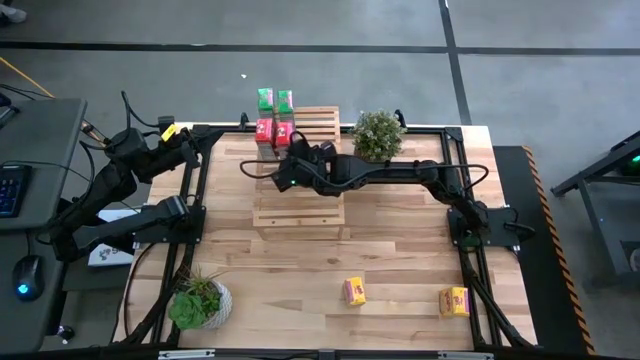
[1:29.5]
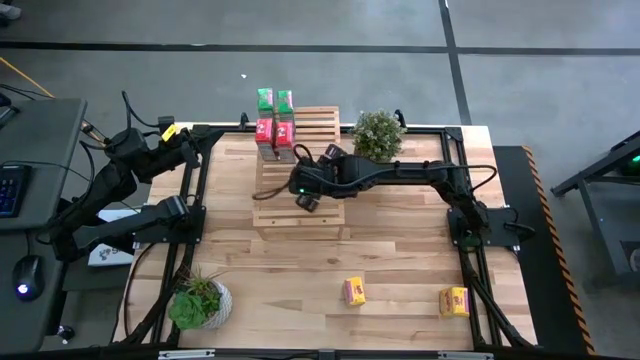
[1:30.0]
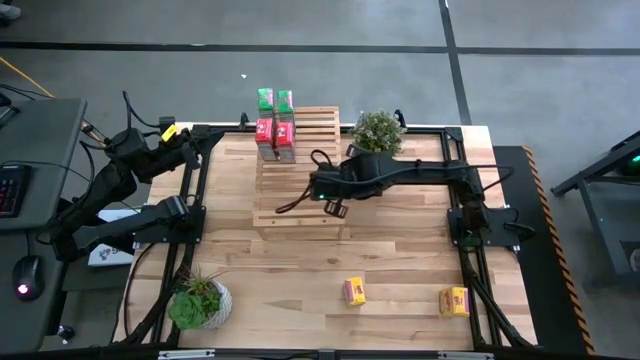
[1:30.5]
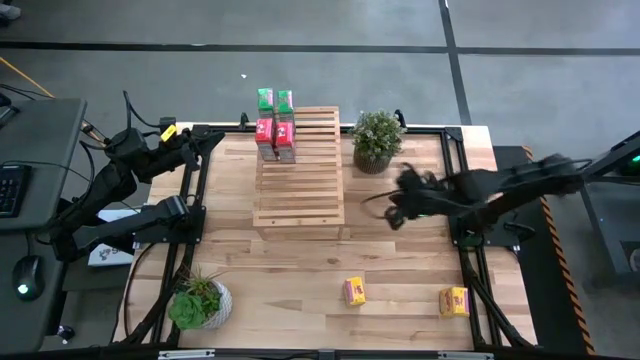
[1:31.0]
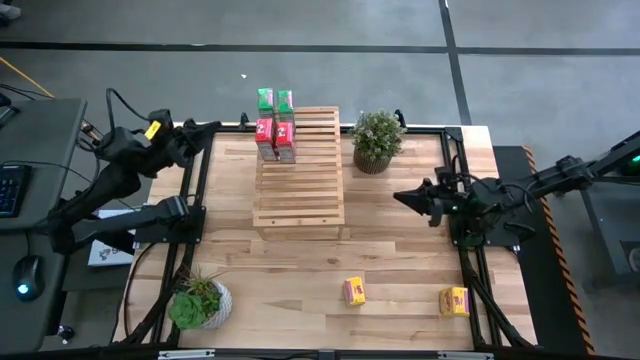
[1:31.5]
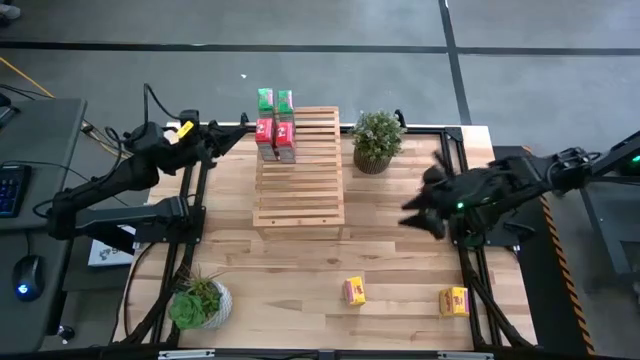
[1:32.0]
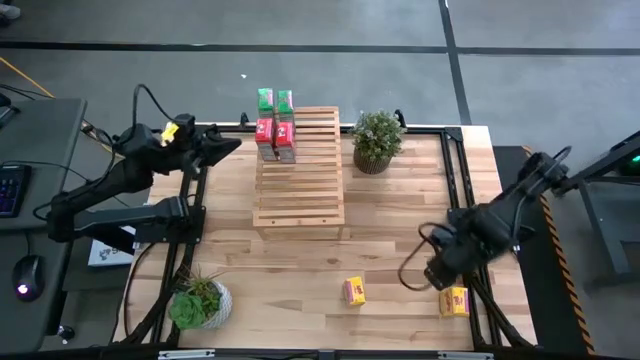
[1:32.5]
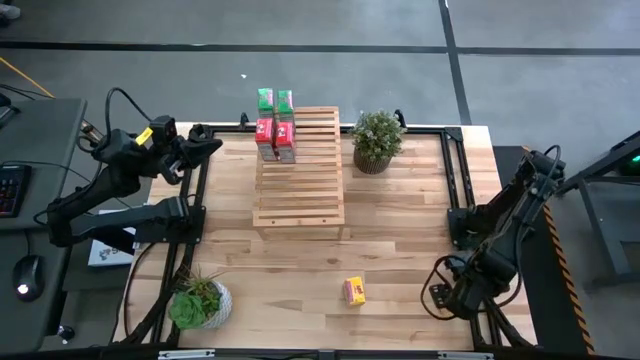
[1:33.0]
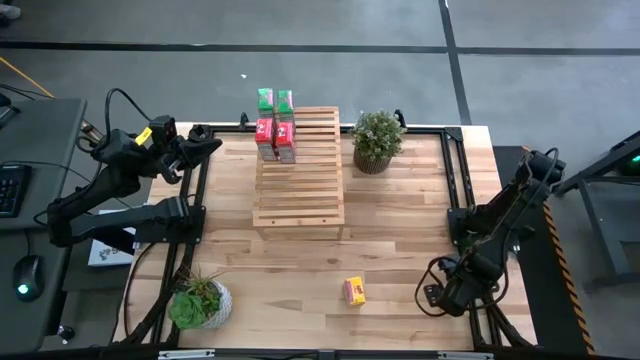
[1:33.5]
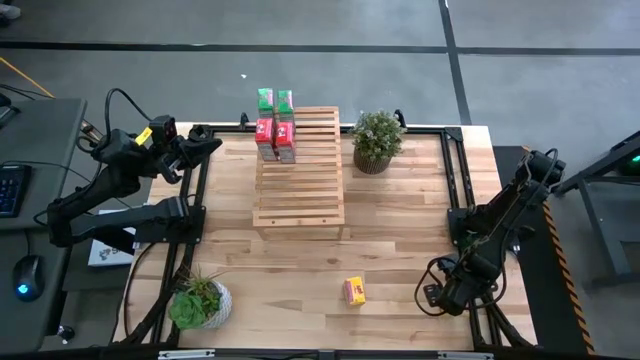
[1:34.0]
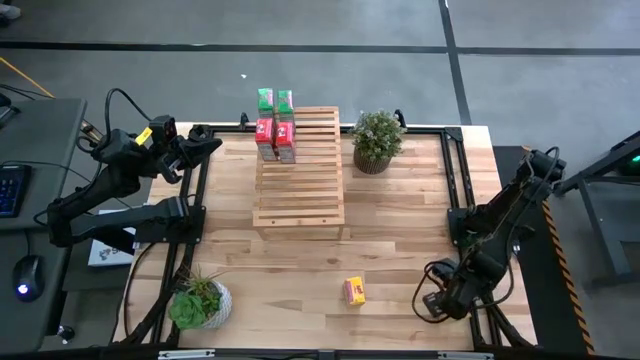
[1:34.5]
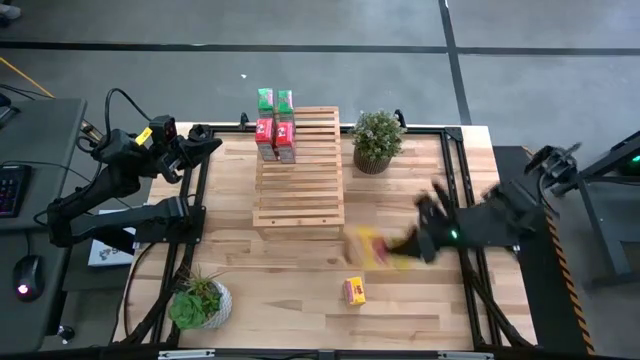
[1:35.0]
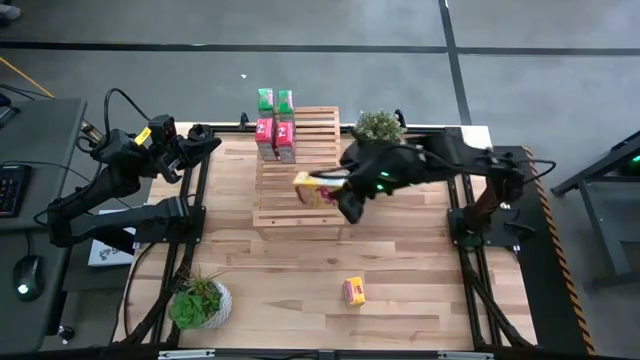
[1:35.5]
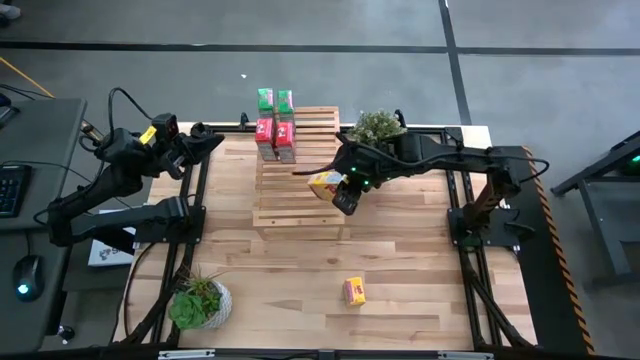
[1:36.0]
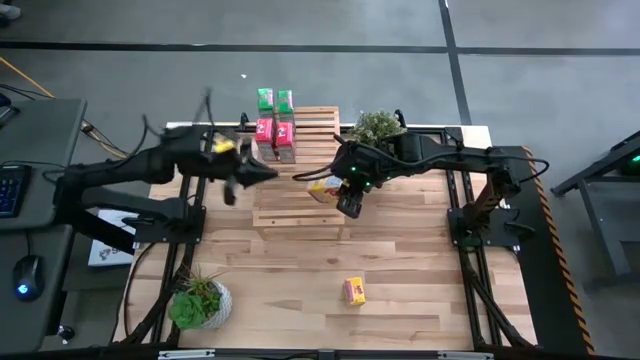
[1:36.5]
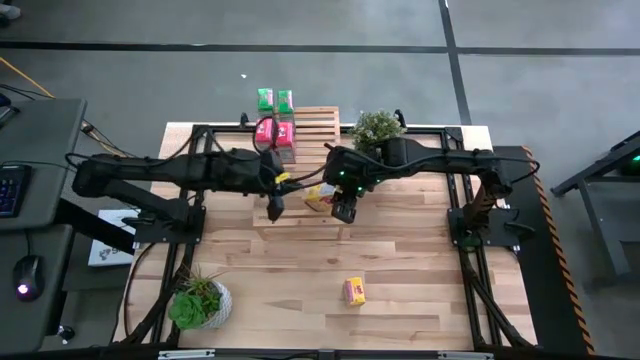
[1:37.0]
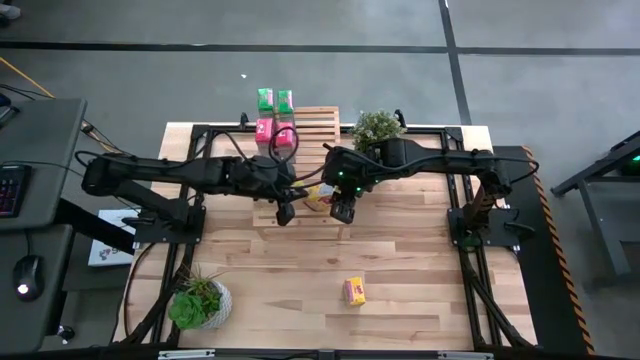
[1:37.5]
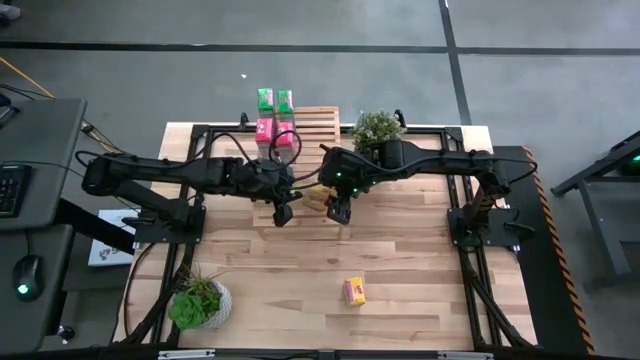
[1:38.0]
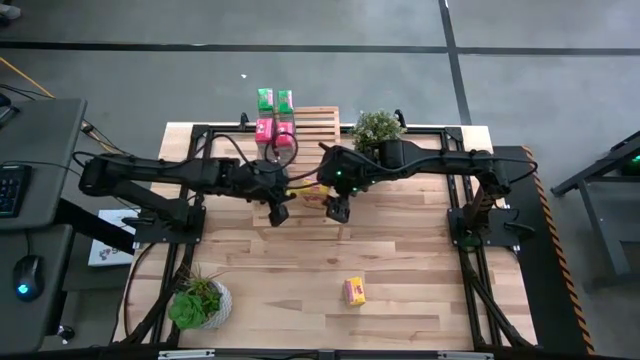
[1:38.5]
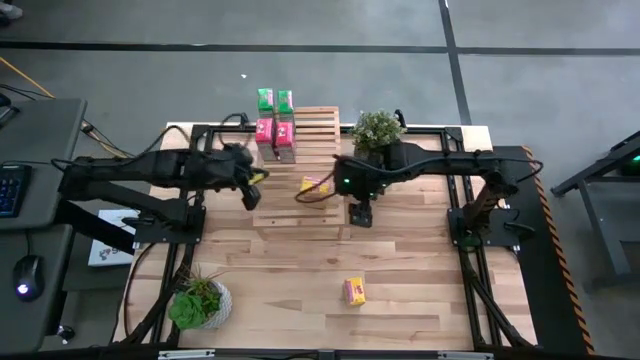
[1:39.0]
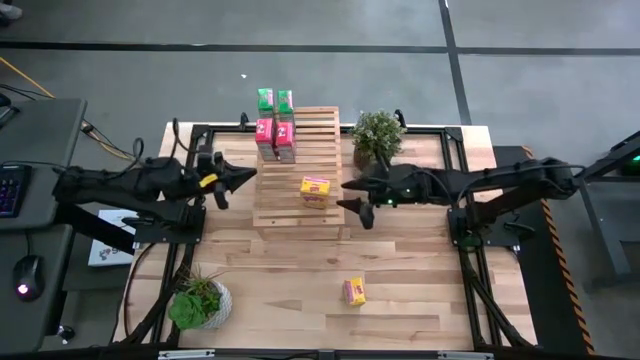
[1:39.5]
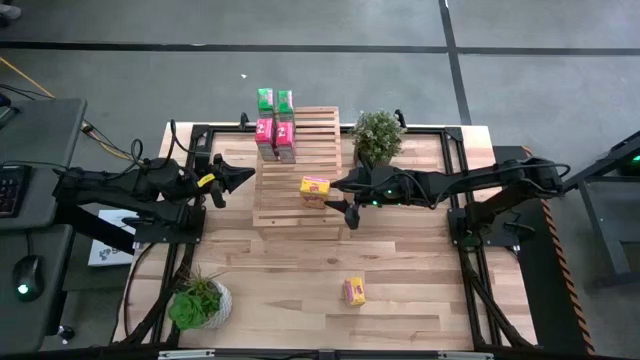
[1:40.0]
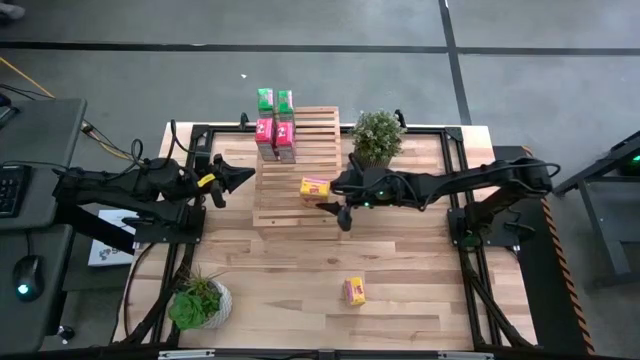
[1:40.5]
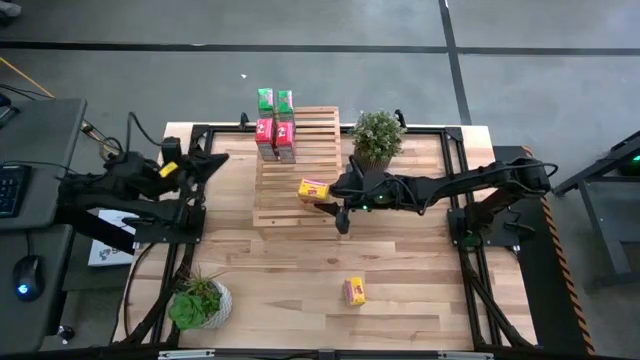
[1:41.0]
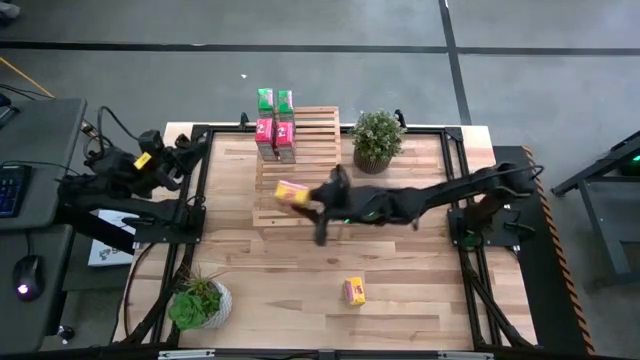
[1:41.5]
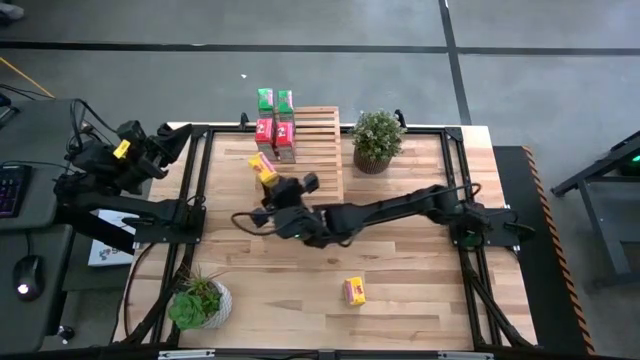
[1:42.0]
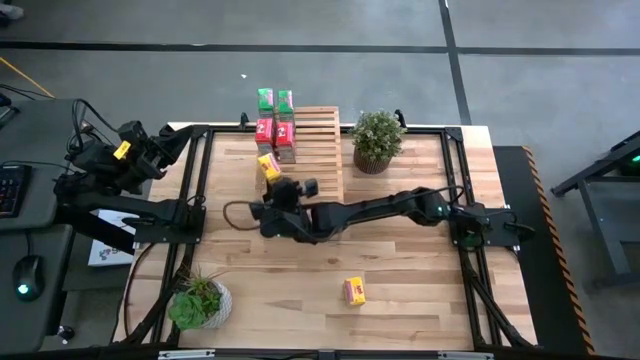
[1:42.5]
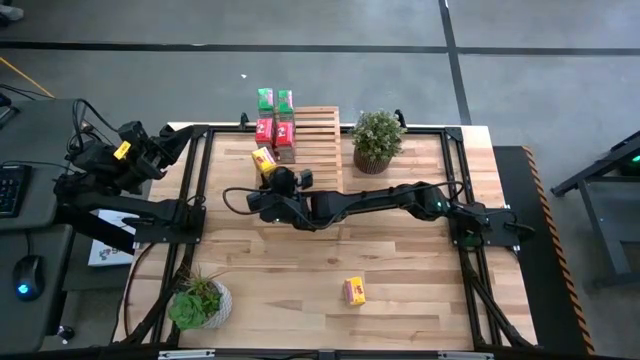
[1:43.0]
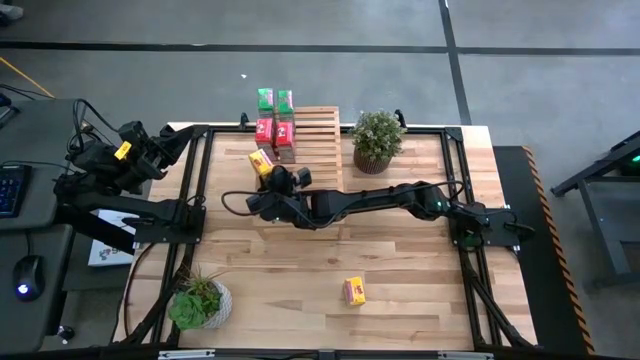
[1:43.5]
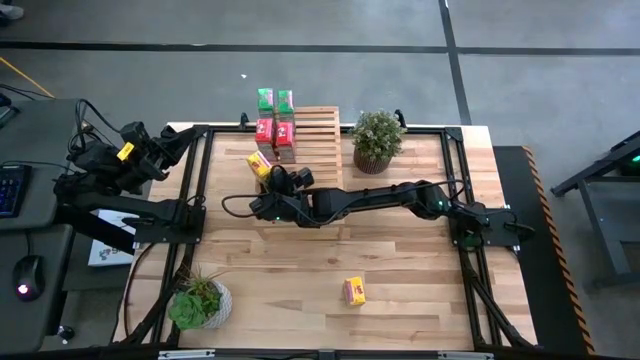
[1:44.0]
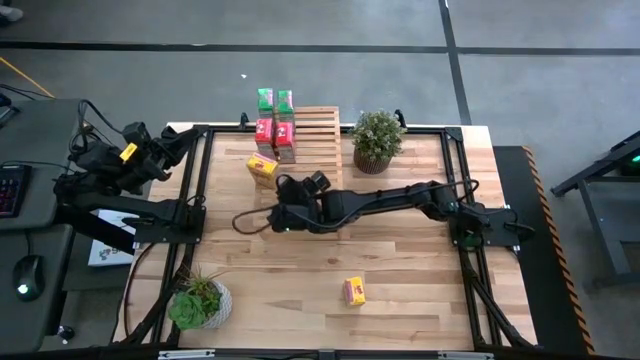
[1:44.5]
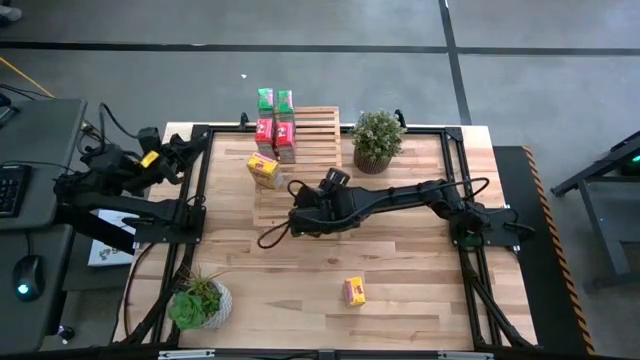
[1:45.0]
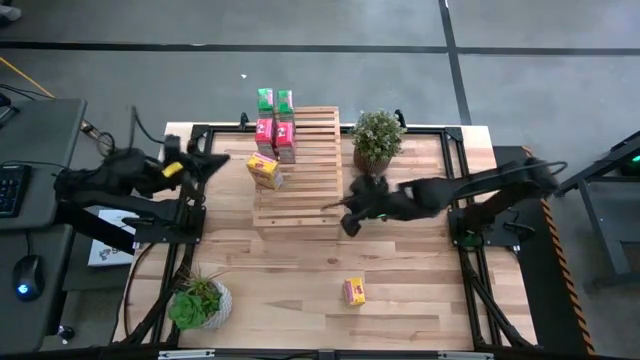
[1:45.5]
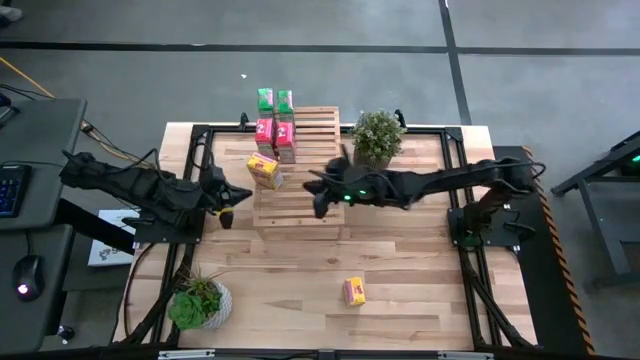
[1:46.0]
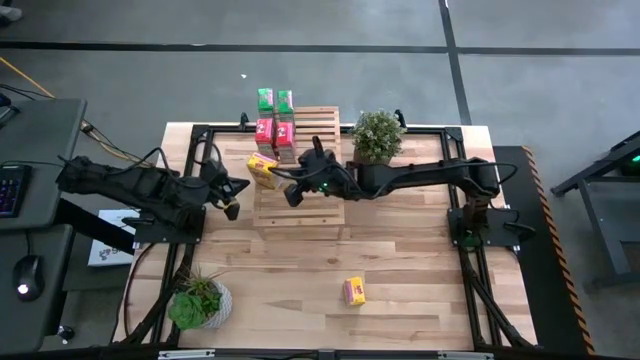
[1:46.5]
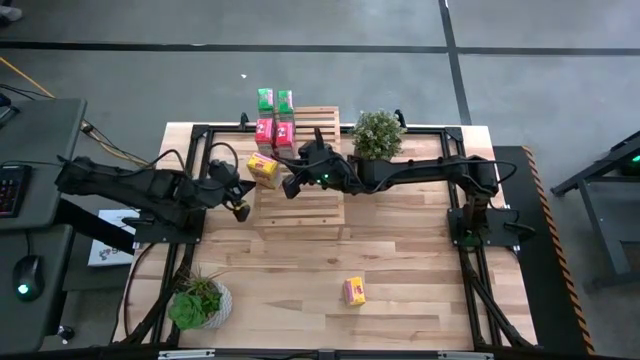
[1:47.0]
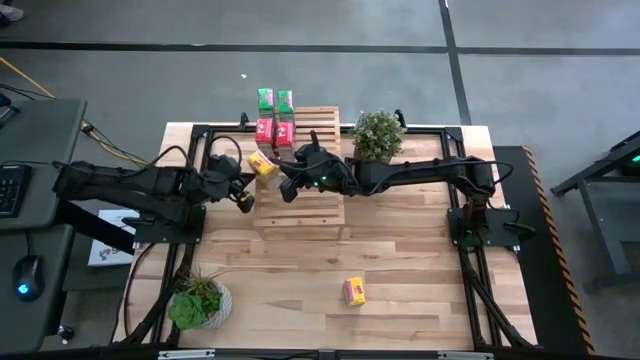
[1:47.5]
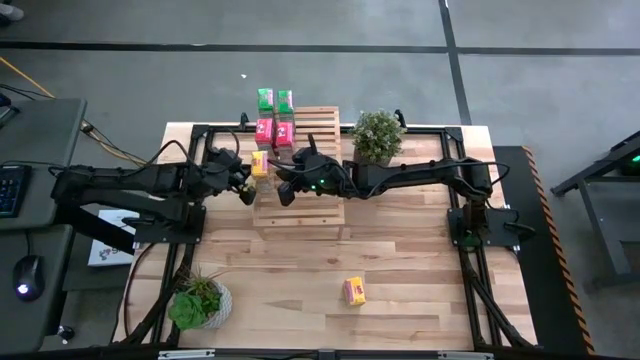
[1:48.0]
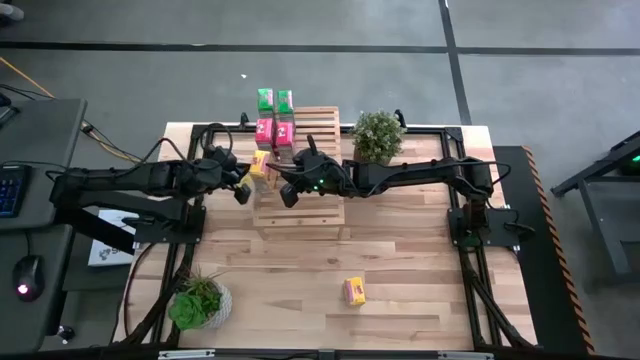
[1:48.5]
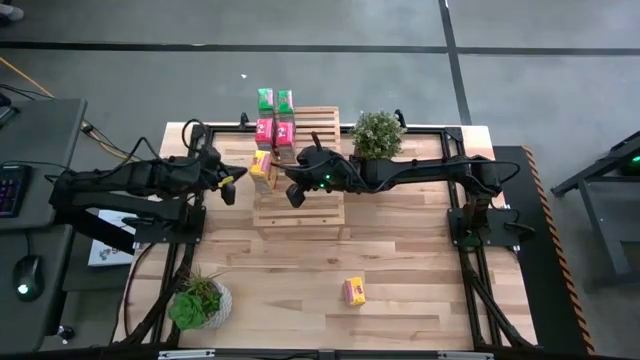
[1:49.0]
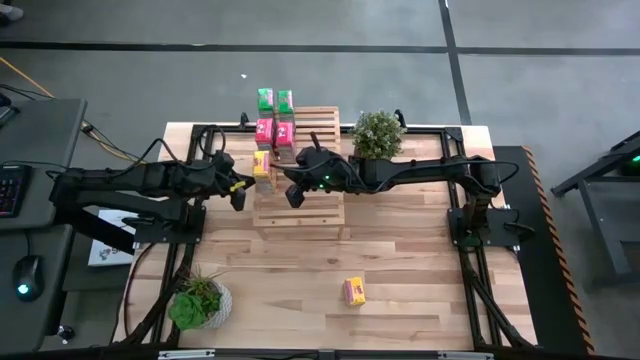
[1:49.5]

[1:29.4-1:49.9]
Task: Stack cereal on shelf
Put the right yellow cereal box on the shelf

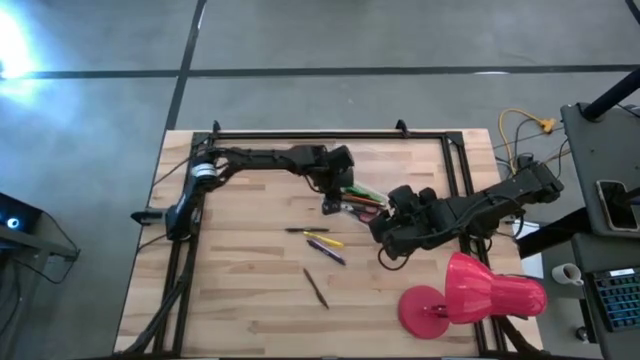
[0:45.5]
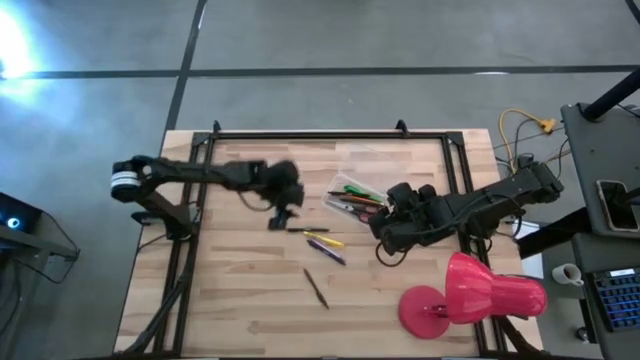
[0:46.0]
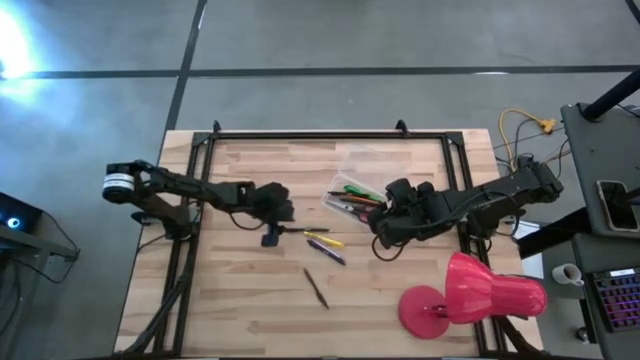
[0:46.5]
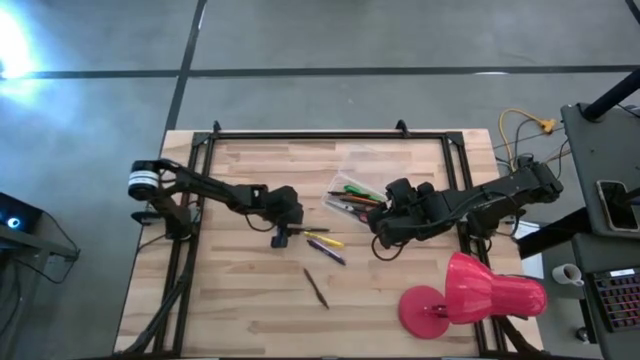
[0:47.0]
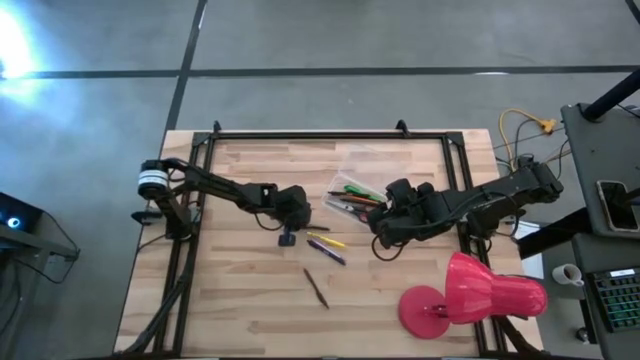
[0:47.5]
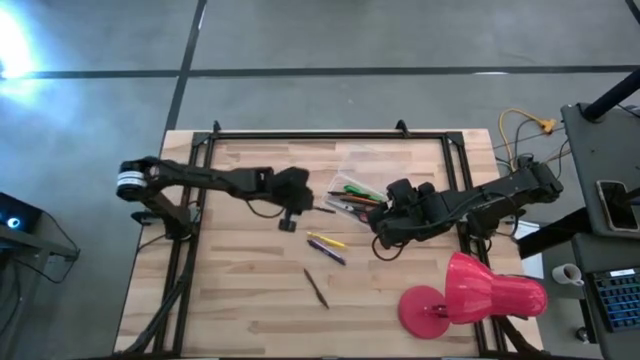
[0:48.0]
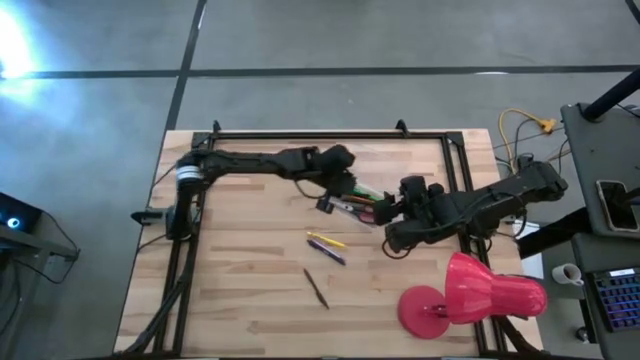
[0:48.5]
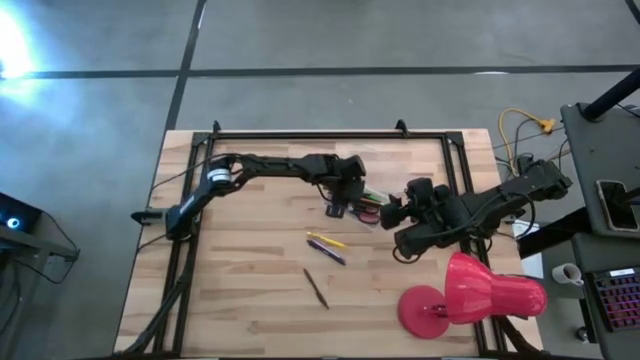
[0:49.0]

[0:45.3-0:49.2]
Task: Pick & place school supplies into a supply box
Put the black pen into the transparent supply box
